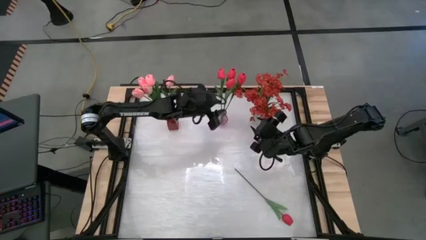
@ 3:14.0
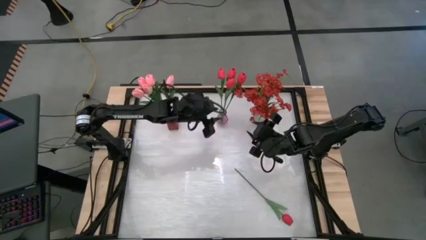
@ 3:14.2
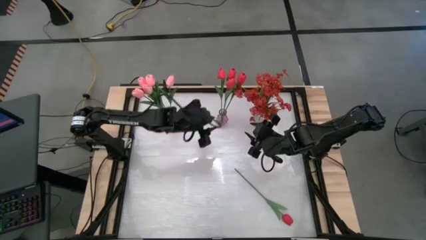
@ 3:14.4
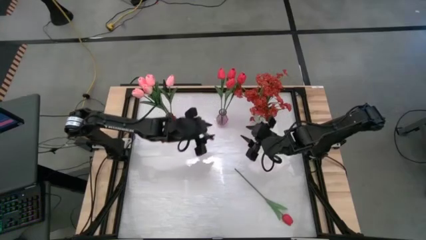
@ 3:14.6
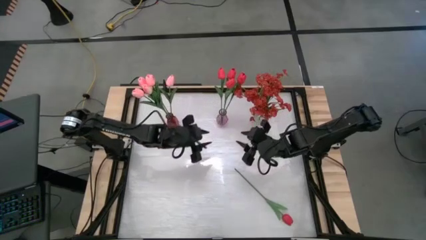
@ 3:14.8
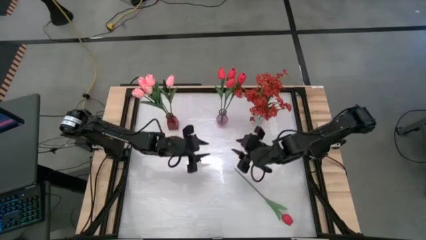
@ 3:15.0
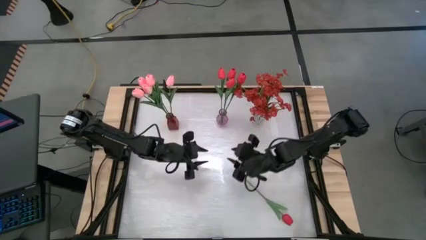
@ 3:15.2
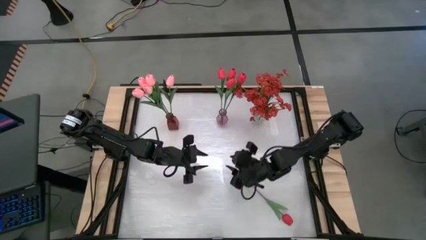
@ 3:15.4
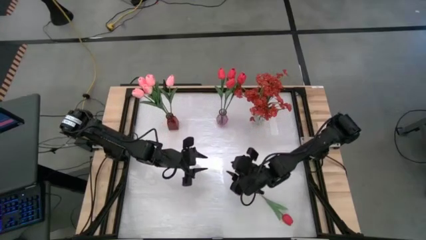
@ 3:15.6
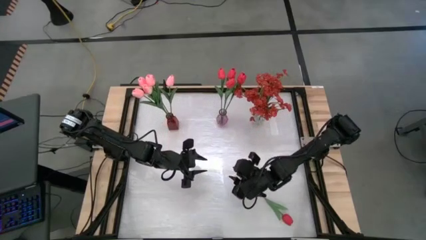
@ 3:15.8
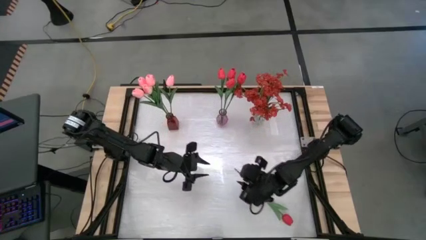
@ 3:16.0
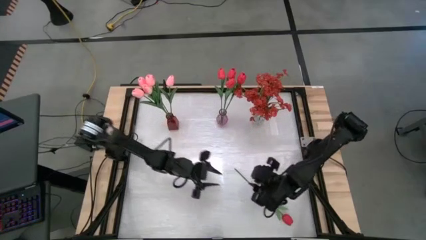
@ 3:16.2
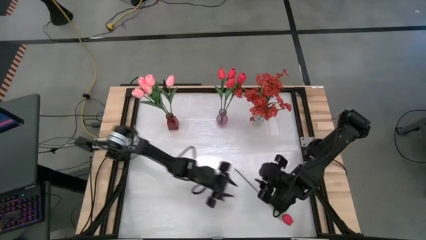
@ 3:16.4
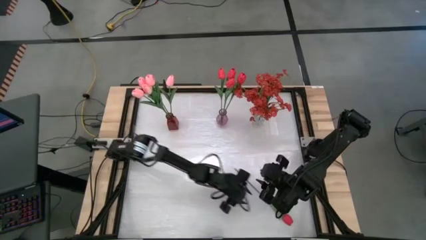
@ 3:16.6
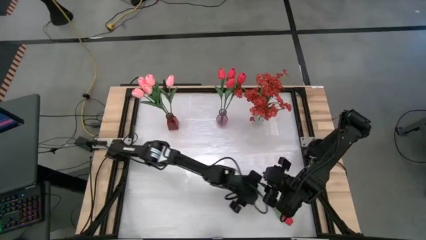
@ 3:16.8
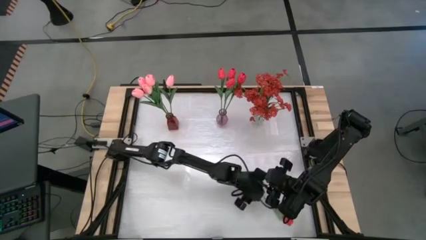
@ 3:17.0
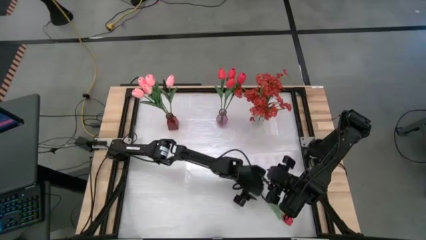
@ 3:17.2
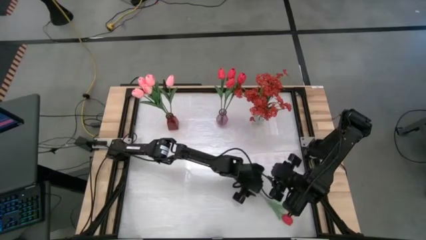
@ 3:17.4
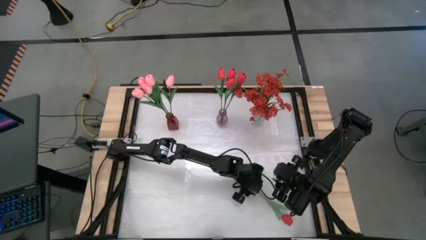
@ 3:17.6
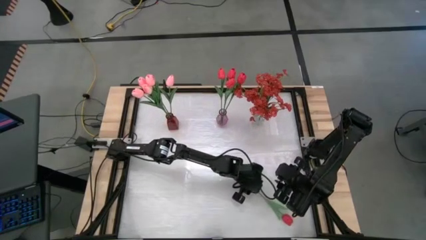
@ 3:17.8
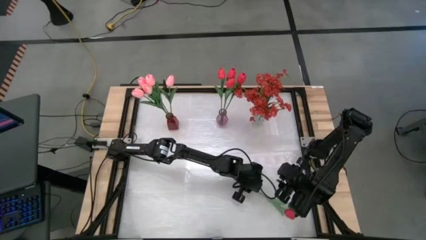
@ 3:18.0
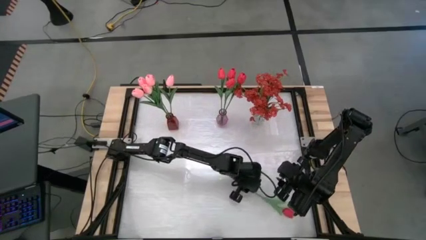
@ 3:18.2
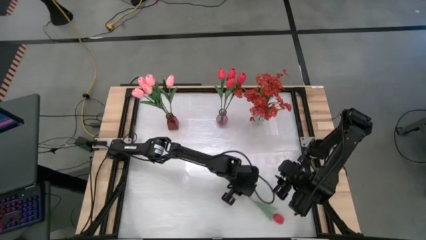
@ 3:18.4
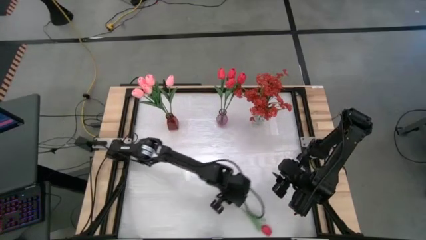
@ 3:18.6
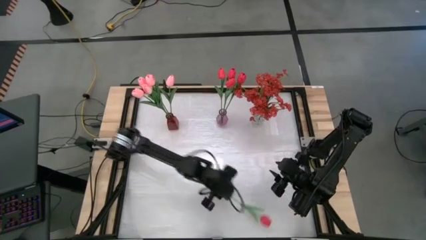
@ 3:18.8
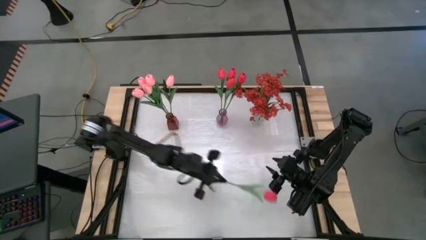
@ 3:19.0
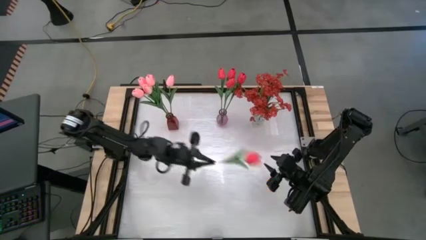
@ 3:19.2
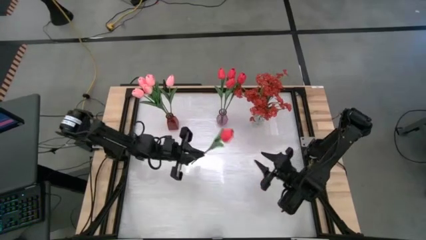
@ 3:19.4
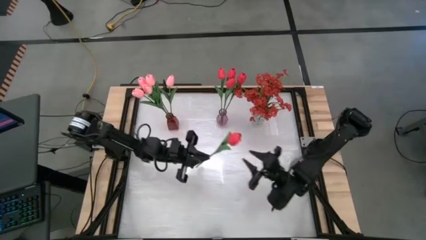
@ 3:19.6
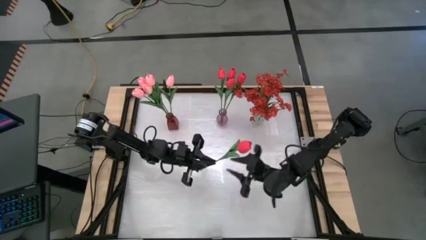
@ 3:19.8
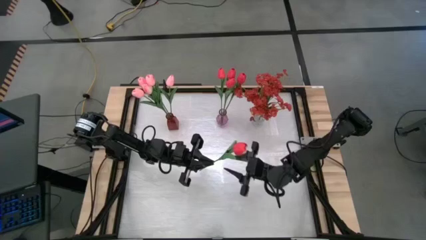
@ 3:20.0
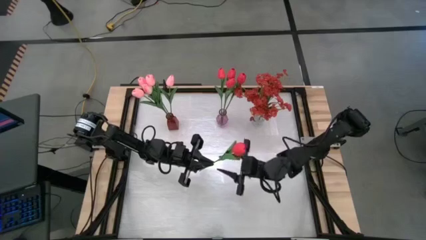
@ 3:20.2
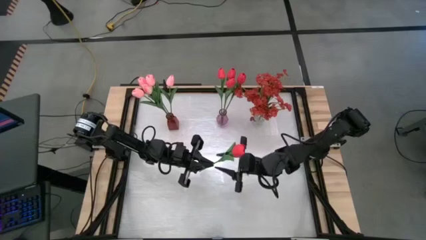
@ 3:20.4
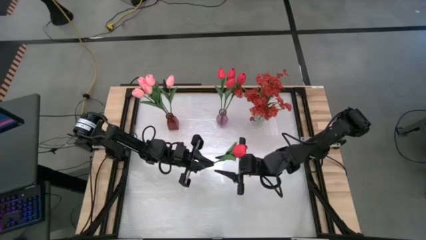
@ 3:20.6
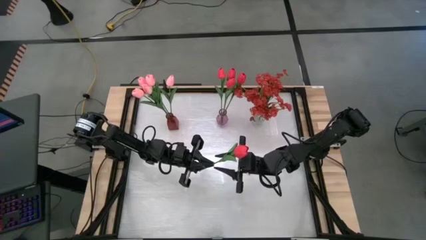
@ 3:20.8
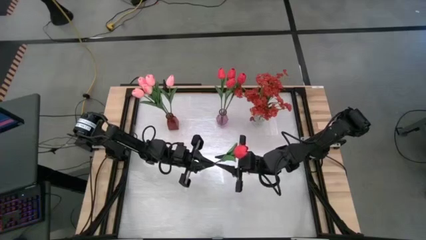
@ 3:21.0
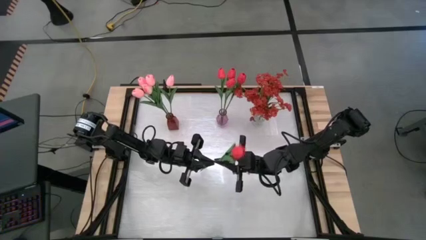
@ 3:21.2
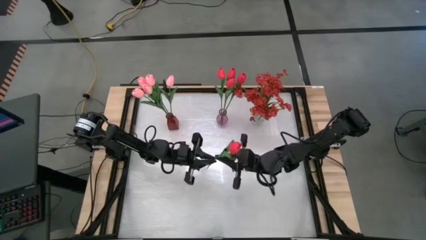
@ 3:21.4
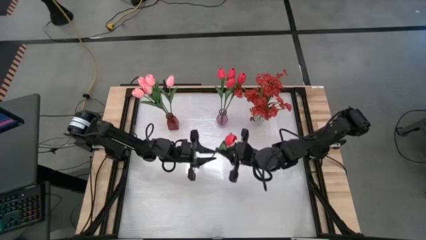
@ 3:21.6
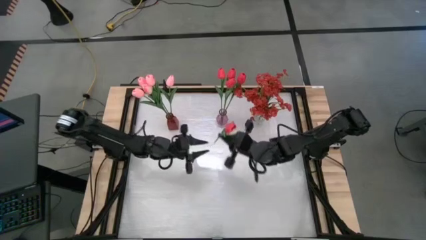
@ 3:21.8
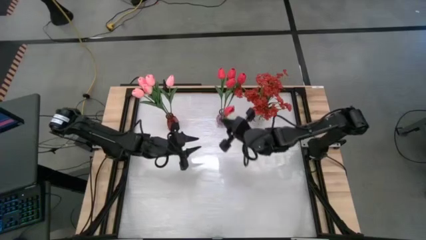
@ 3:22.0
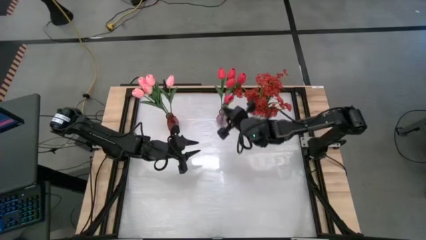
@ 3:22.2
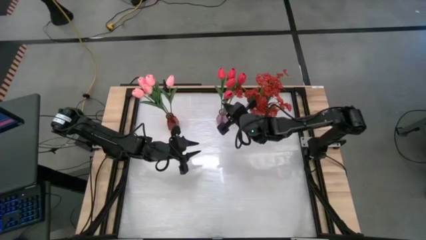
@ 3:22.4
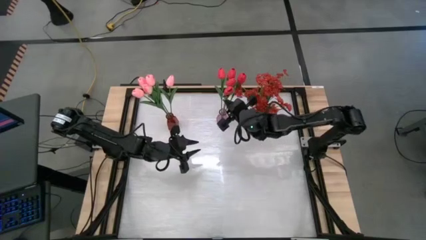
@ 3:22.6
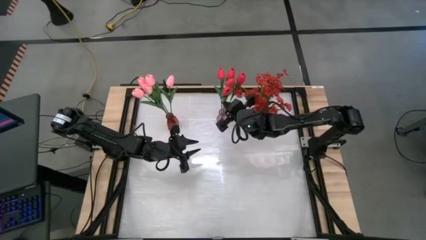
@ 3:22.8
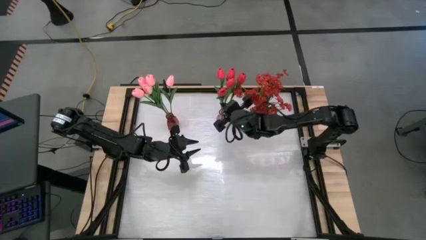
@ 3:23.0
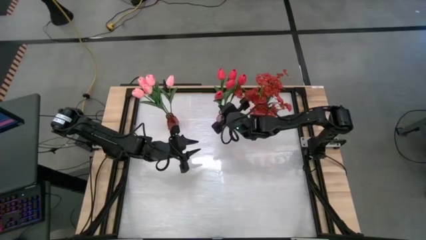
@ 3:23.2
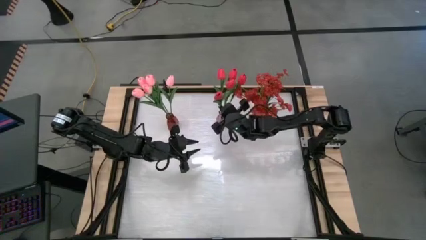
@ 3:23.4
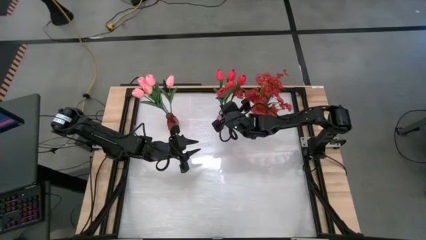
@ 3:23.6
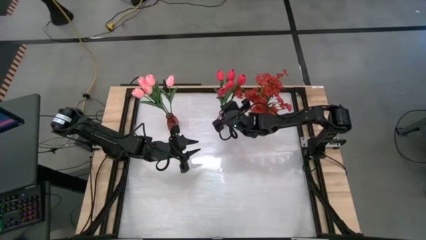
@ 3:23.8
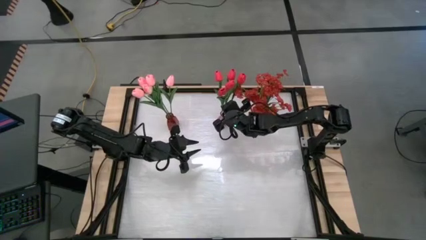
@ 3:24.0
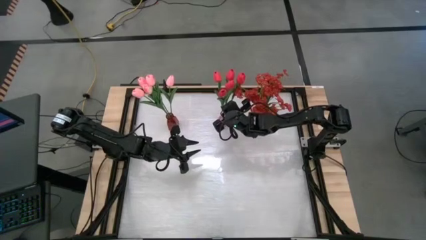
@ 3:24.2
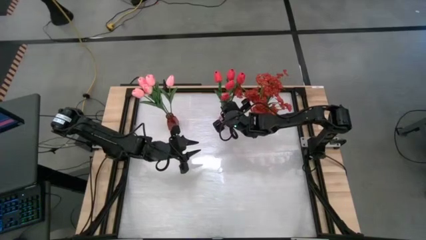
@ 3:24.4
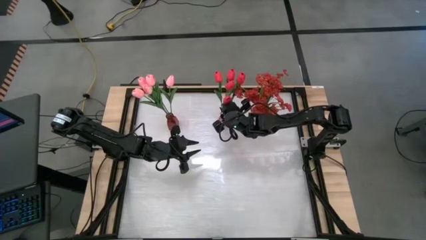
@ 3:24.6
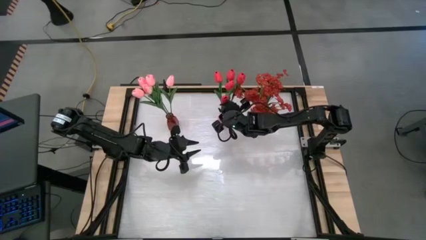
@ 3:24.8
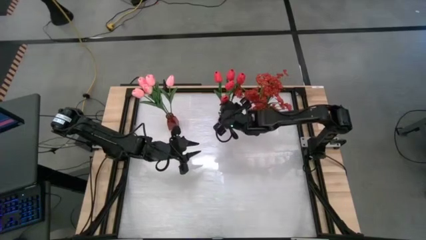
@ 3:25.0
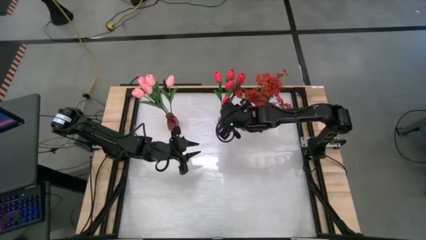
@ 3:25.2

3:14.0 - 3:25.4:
Task: Sort flowers into vase by color
Put the red tulip into the purple vase

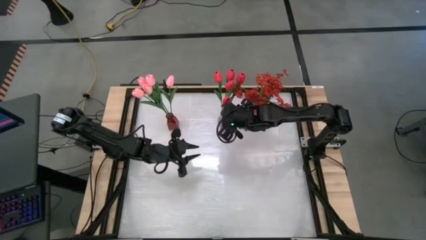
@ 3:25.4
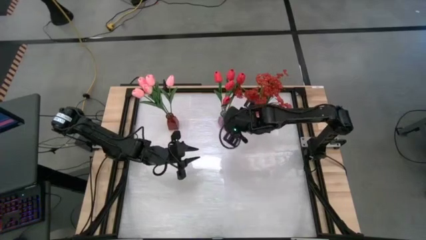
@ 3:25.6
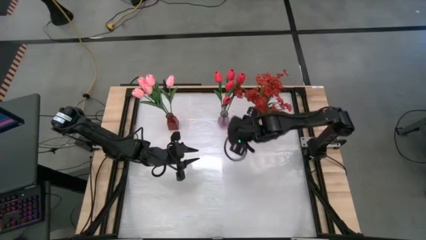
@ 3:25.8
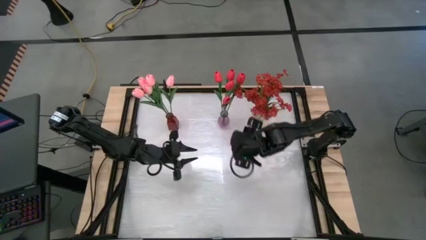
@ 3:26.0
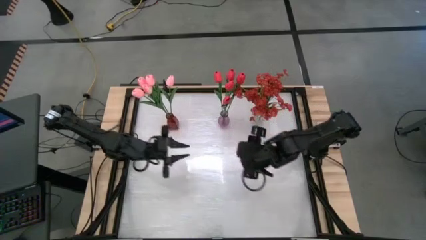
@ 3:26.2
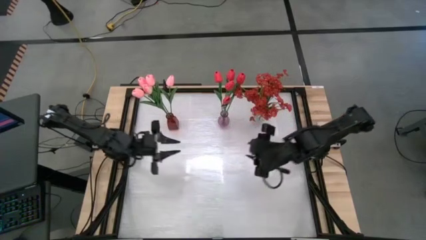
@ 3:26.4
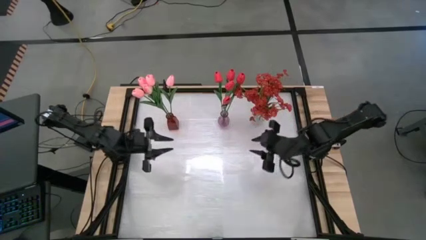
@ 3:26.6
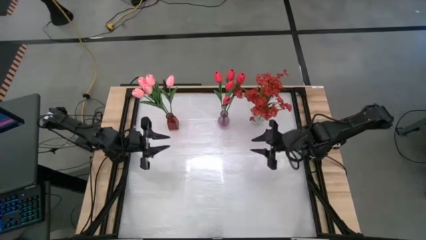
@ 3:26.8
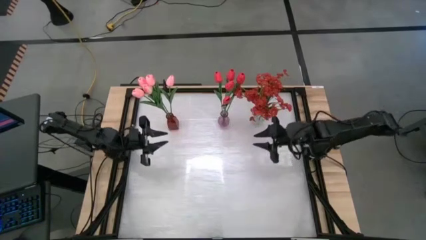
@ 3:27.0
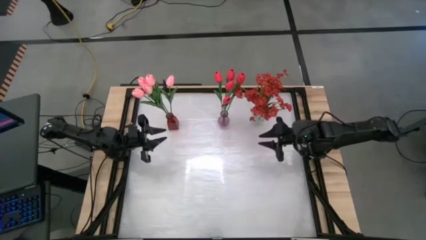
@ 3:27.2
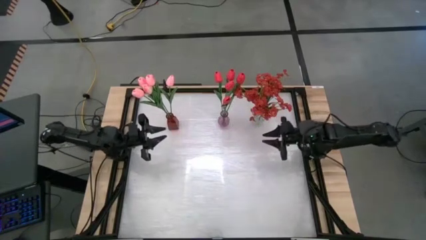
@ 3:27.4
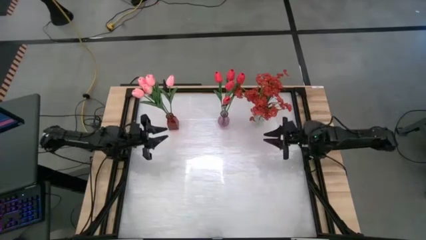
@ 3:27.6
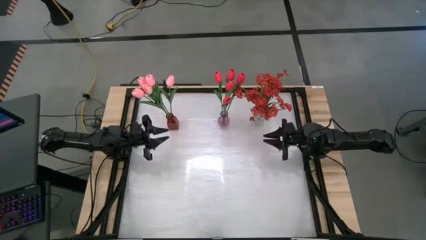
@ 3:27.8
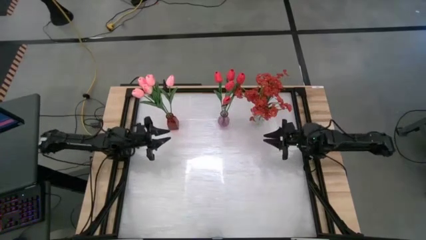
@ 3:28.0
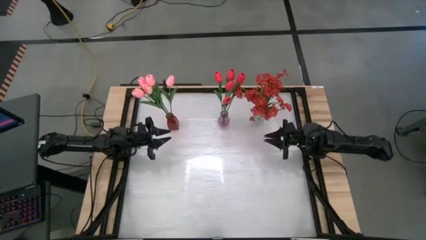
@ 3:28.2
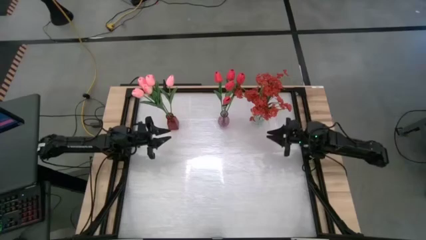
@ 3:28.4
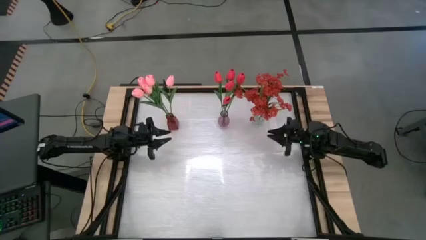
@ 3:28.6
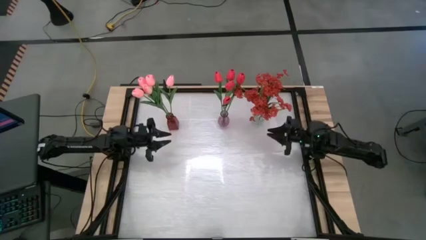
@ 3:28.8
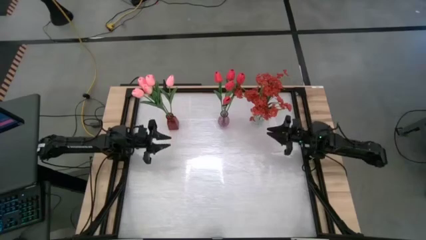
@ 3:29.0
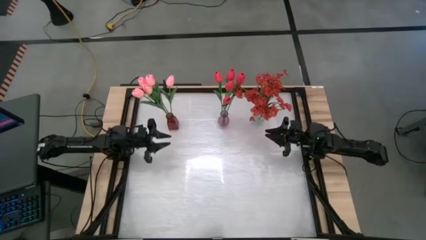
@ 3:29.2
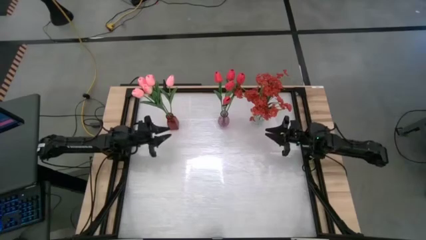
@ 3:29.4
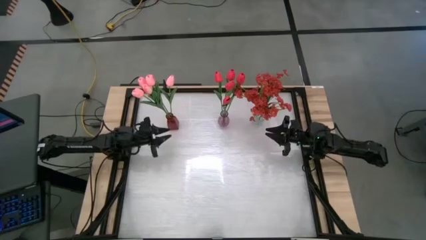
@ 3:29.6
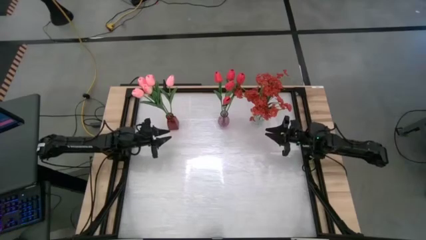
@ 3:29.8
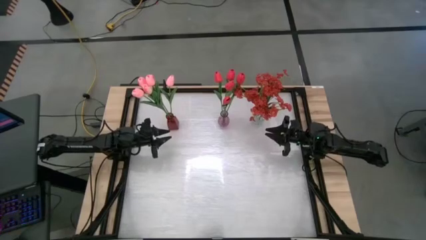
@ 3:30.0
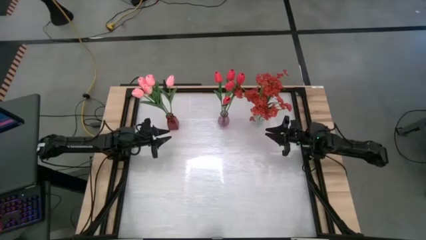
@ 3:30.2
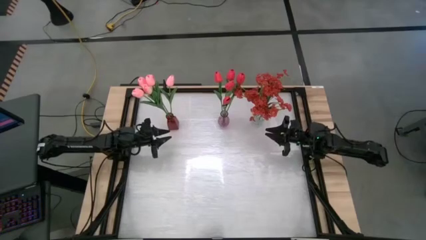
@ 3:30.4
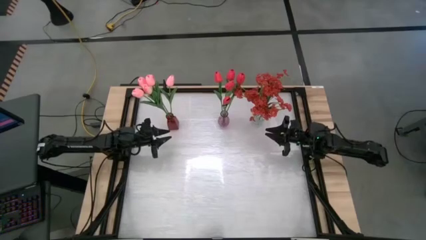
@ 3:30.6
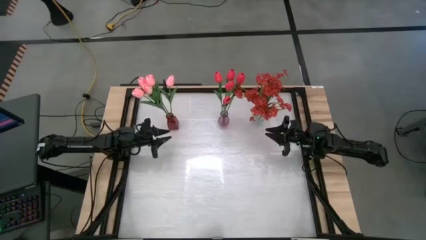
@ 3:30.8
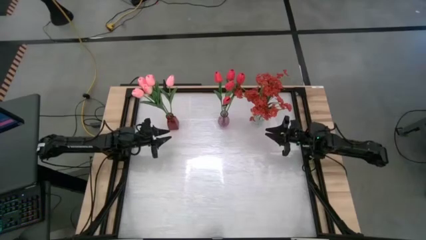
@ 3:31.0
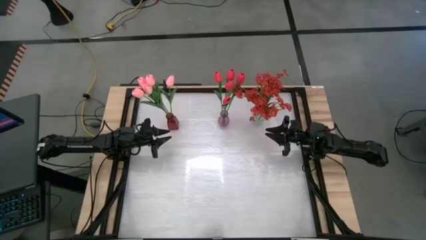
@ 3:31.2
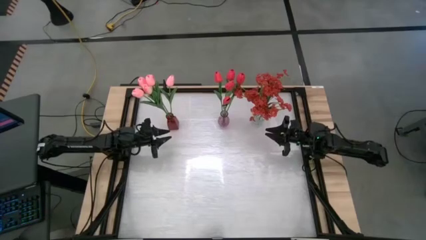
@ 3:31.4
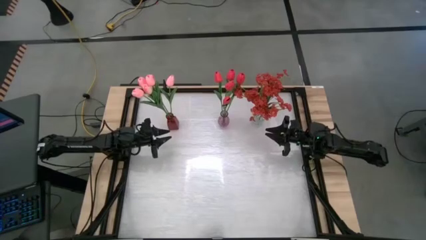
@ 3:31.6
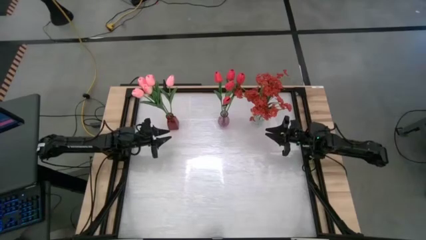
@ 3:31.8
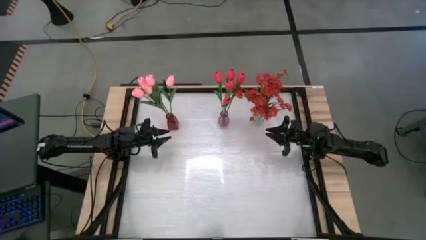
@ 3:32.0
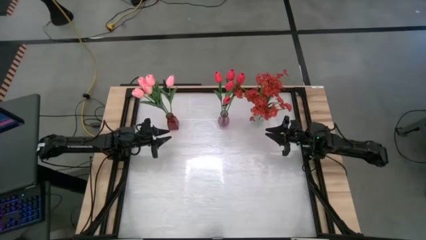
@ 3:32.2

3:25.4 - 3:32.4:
Return to Home Position
